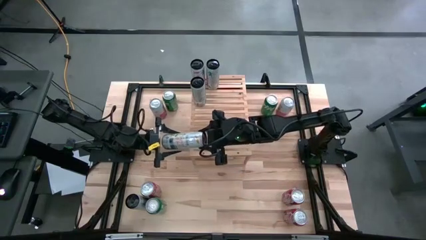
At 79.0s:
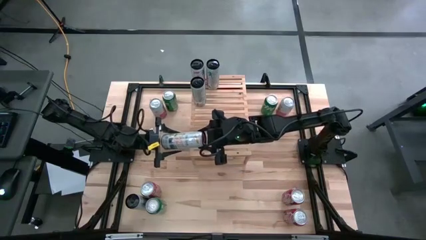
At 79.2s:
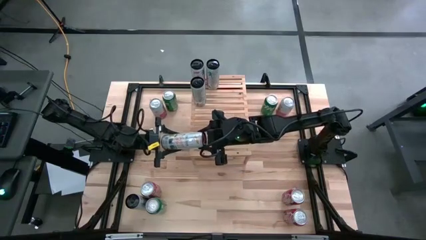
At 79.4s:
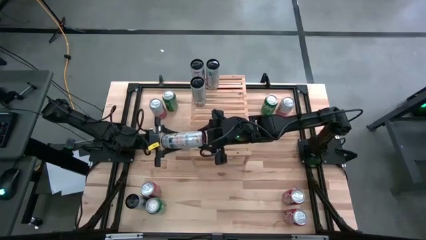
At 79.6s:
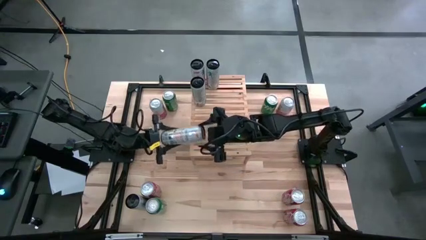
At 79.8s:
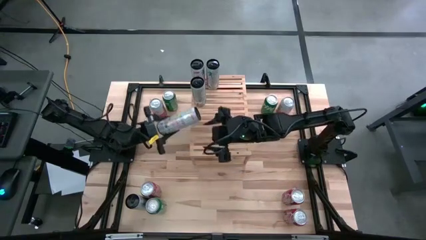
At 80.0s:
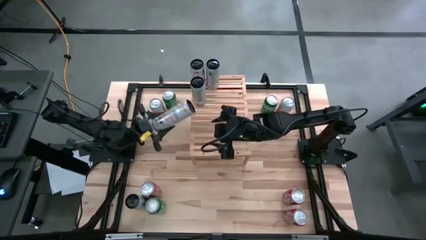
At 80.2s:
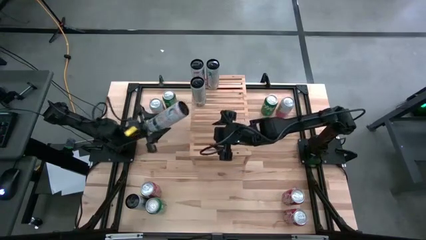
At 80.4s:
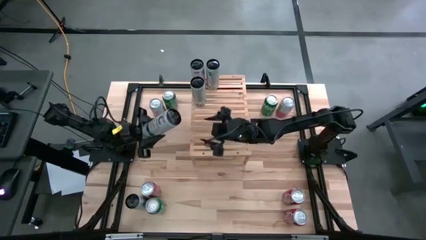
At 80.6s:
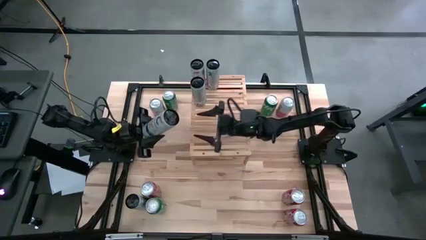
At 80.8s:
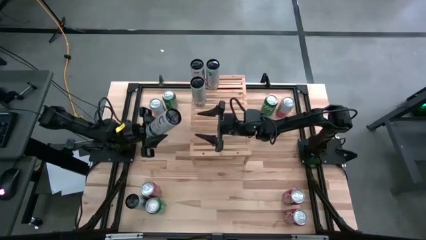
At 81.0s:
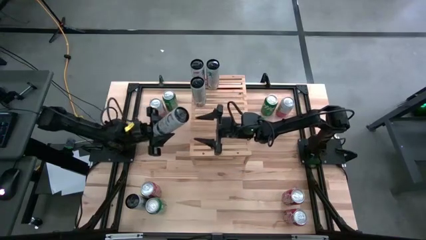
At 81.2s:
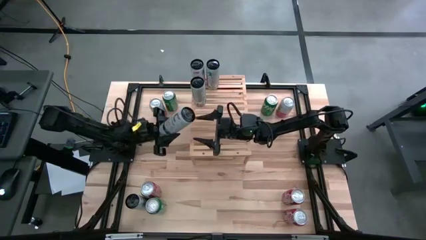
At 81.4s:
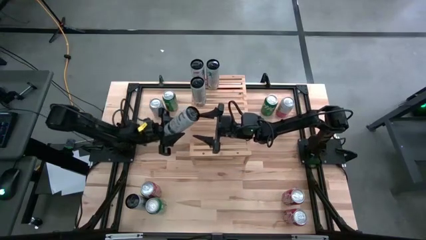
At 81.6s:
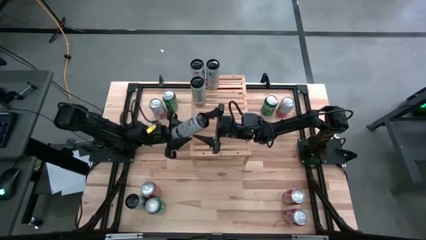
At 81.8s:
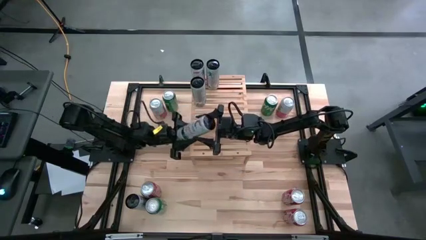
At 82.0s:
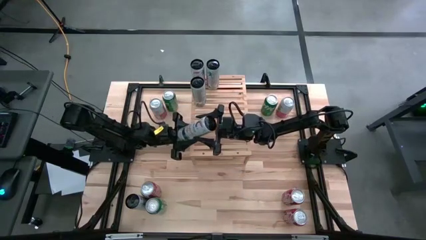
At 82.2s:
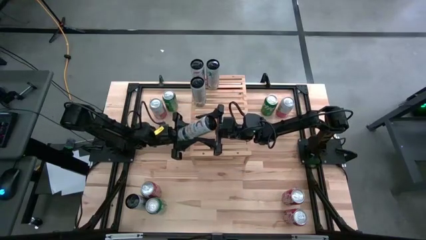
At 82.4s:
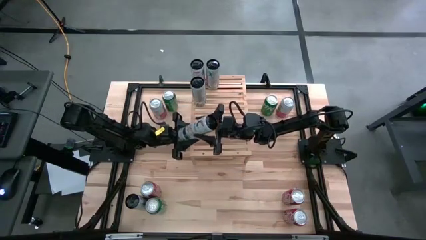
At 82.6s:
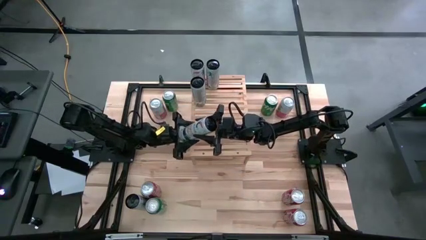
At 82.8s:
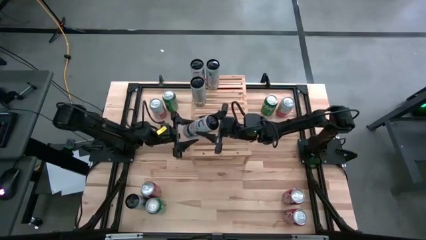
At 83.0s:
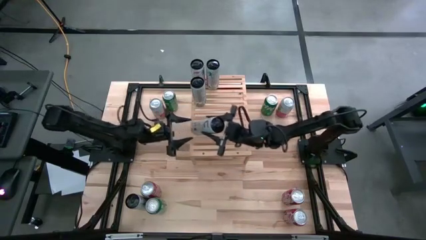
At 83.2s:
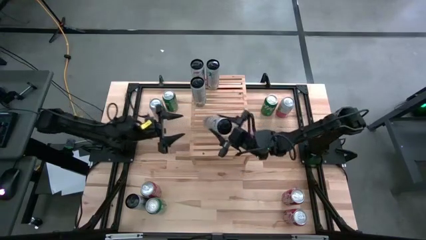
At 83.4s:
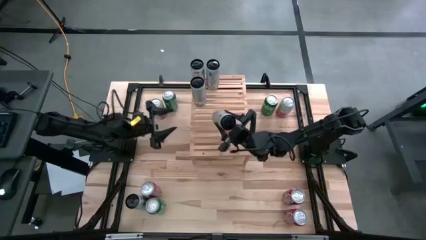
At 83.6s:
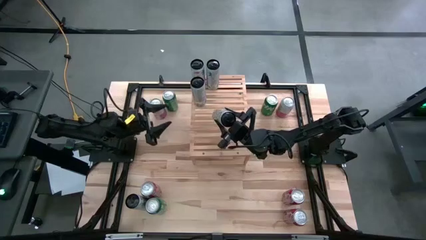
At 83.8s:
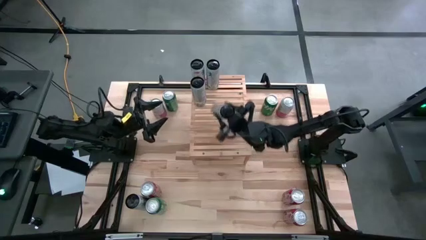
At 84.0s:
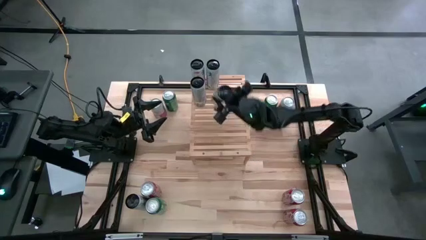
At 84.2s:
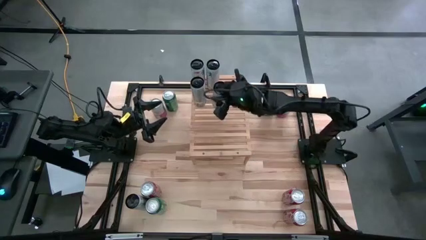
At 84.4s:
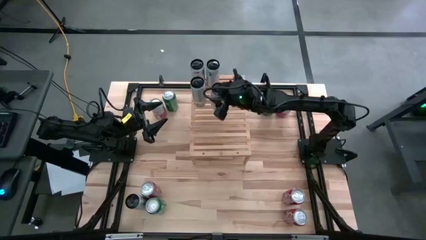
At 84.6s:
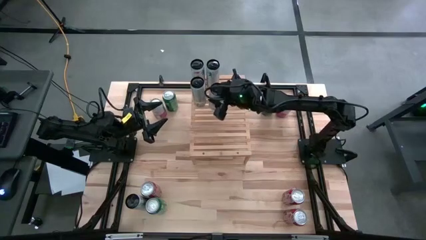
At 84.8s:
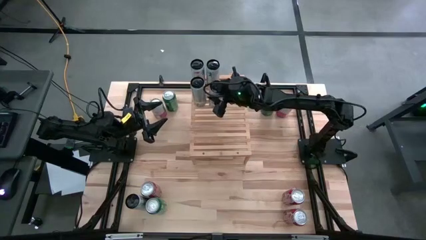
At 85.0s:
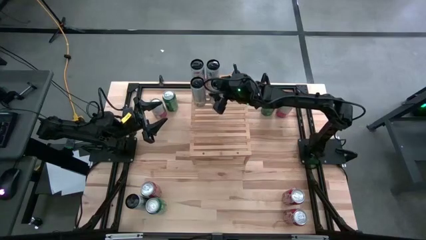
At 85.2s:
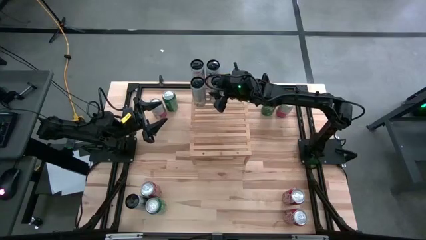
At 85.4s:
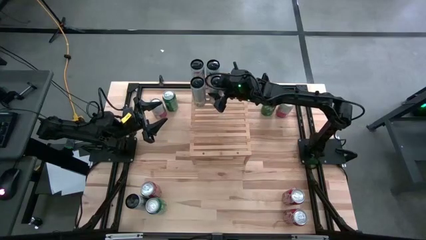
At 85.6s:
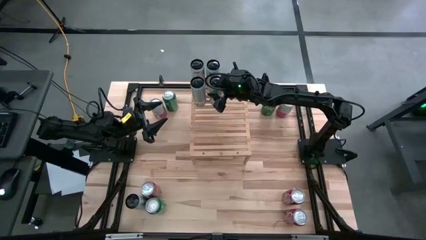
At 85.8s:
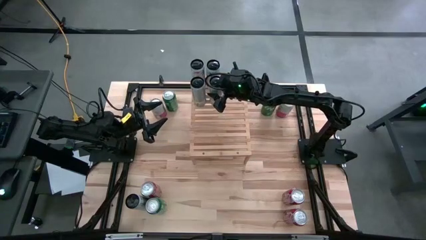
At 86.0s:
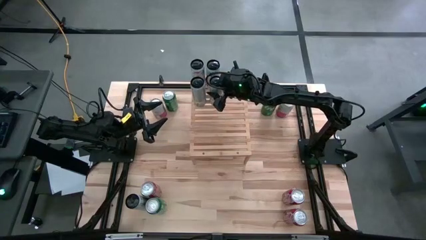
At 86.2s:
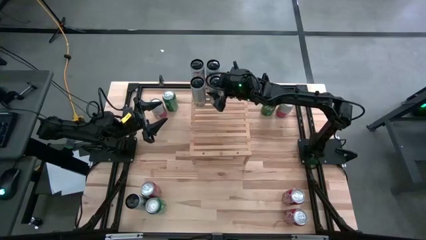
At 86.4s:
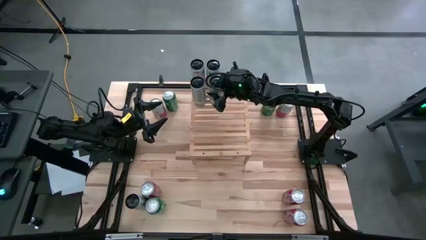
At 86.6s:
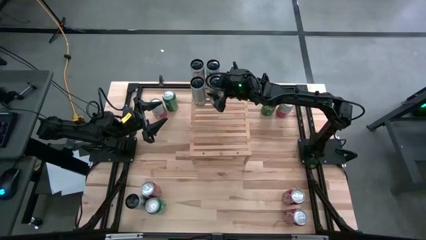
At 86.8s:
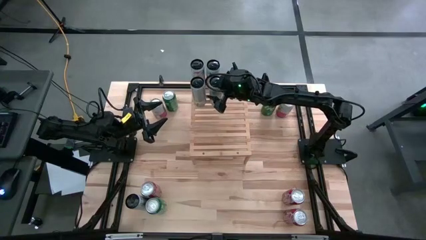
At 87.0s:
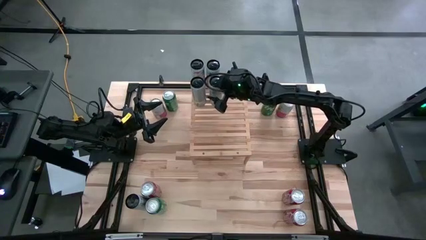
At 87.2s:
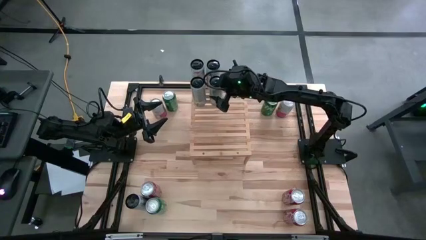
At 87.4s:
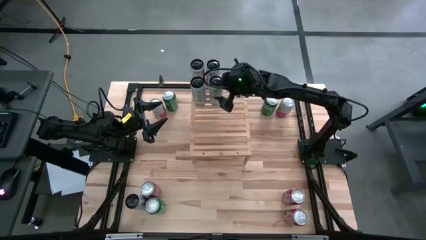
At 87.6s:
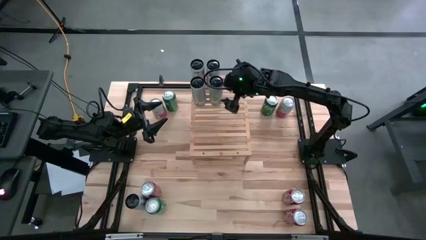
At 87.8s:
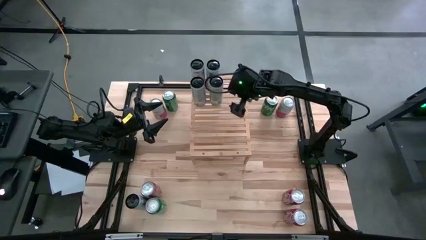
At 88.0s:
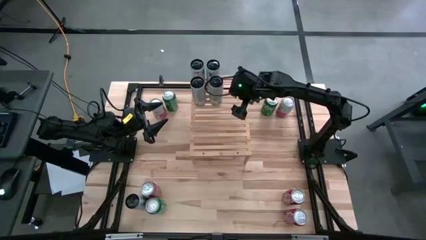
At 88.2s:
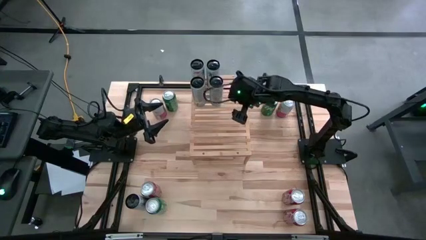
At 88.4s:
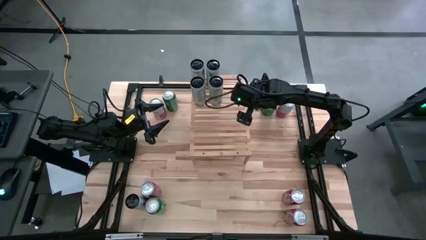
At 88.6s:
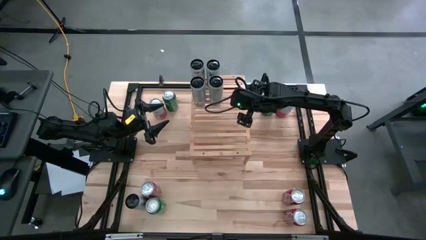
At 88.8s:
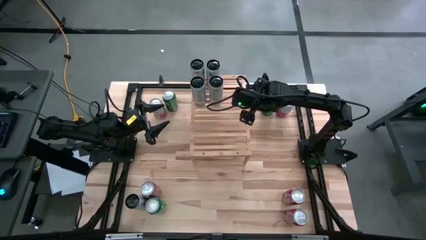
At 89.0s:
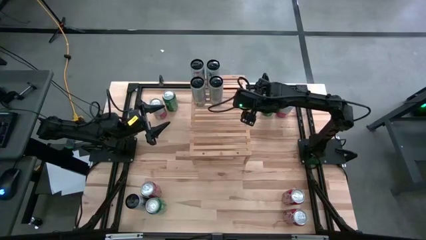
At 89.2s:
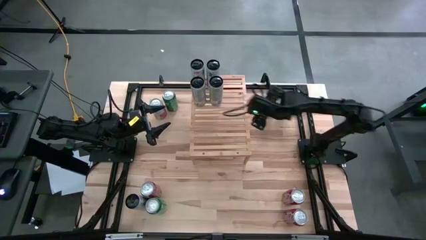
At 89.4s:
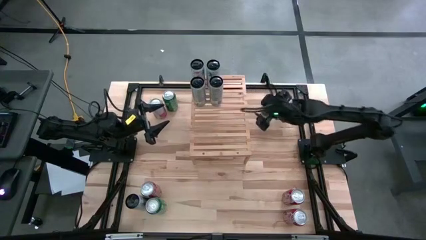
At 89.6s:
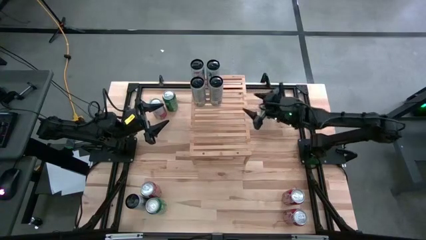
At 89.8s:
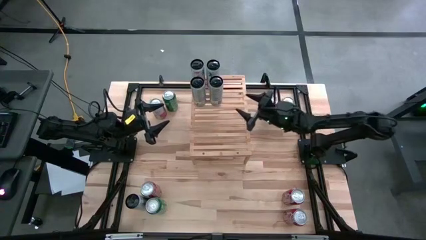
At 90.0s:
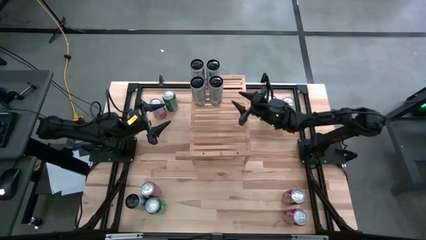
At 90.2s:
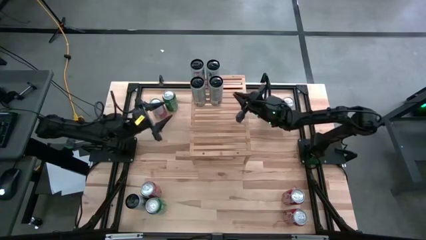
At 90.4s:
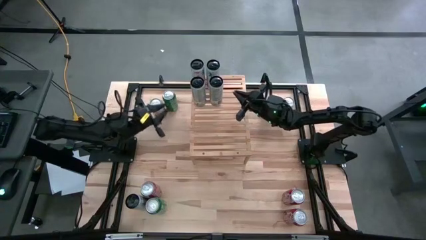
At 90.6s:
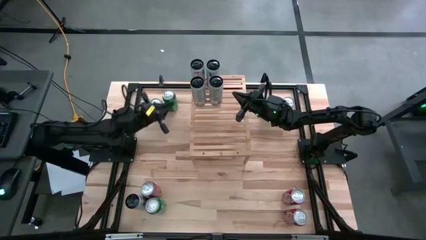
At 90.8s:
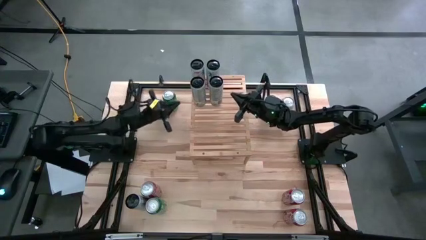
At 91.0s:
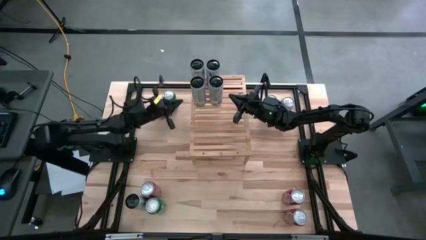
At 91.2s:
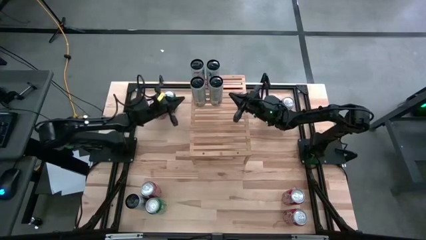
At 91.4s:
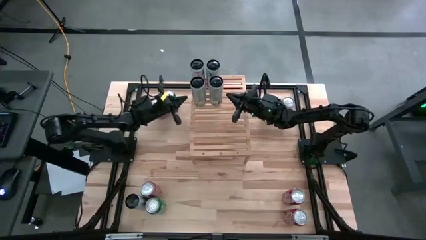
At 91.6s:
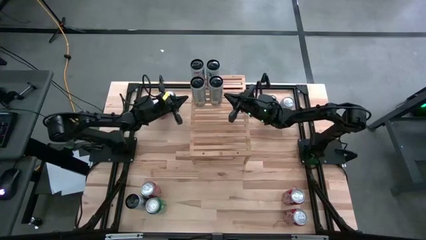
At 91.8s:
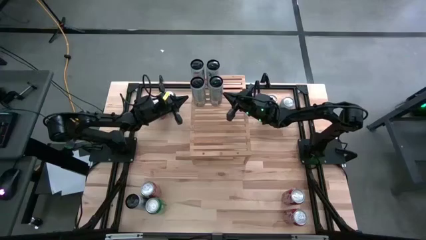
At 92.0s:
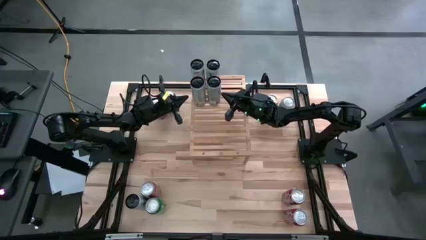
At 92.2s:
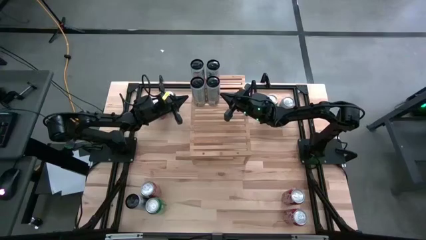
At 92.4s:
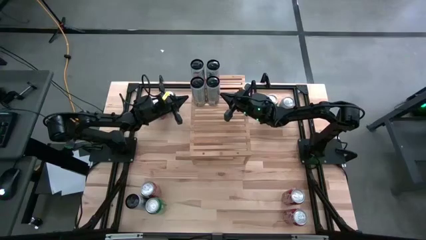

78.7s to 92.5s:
Task: Place canned beverage on shelf
Put the white yellow soda can aligned with the other white yellow soda can on the shelf

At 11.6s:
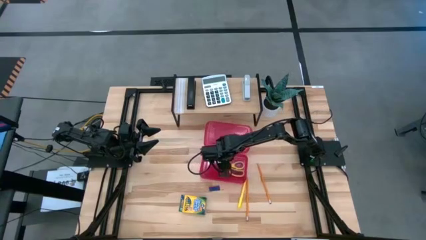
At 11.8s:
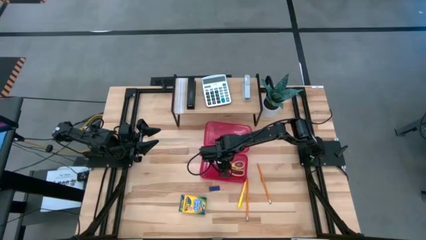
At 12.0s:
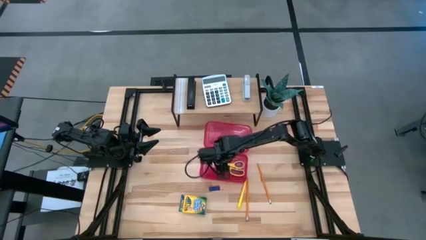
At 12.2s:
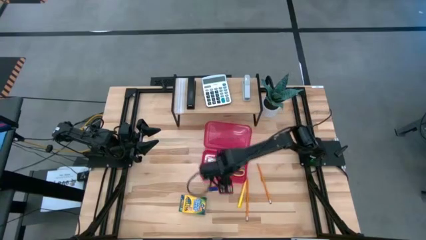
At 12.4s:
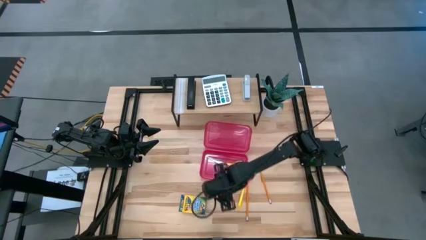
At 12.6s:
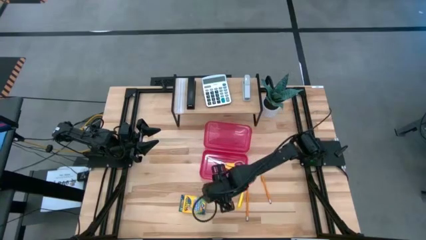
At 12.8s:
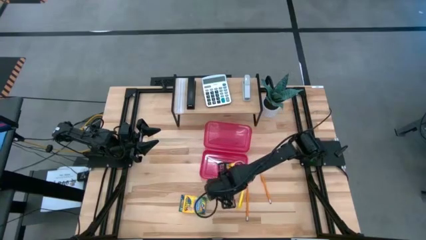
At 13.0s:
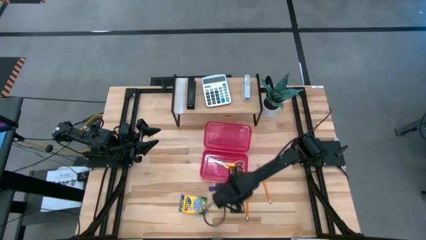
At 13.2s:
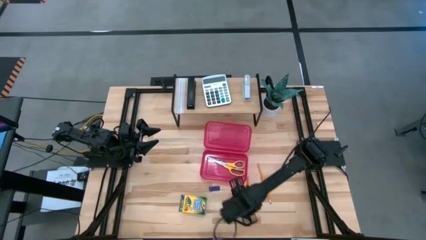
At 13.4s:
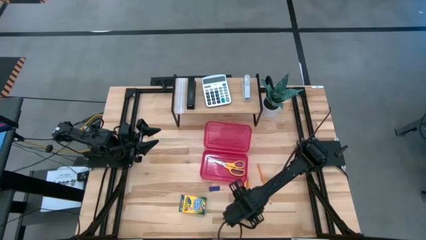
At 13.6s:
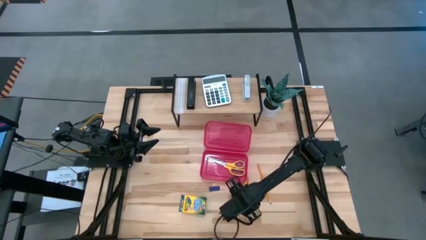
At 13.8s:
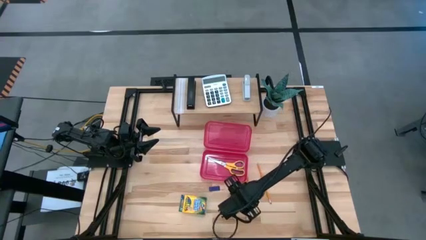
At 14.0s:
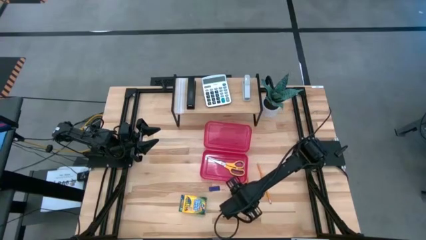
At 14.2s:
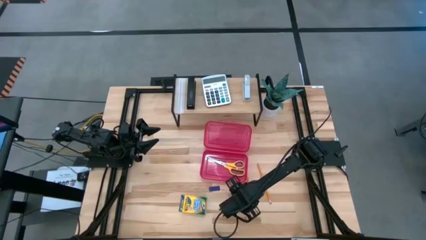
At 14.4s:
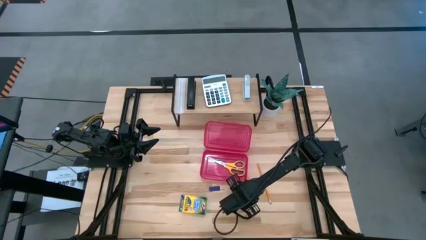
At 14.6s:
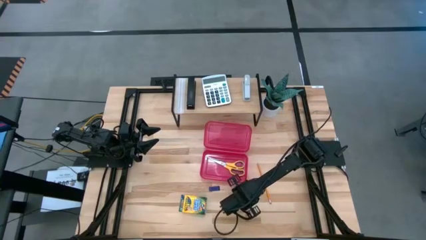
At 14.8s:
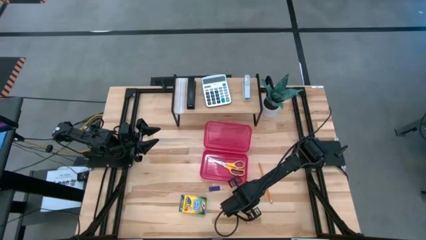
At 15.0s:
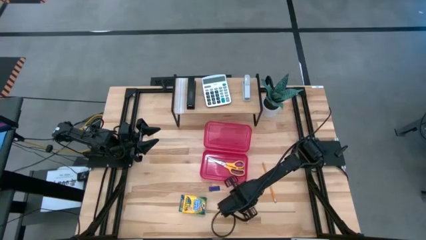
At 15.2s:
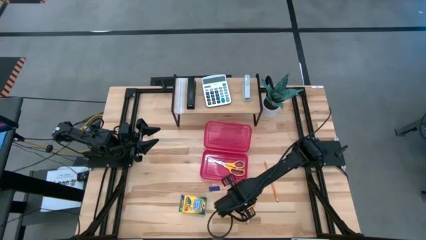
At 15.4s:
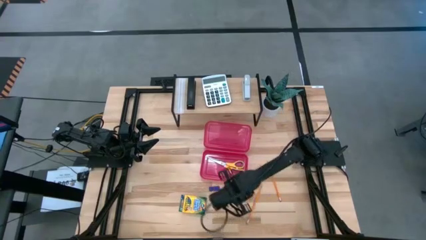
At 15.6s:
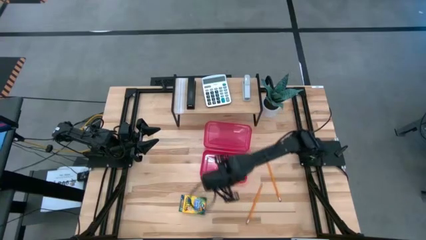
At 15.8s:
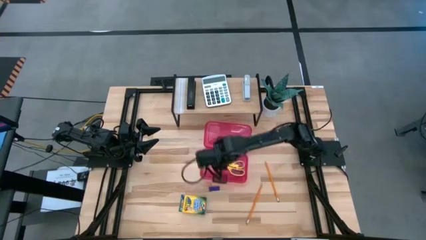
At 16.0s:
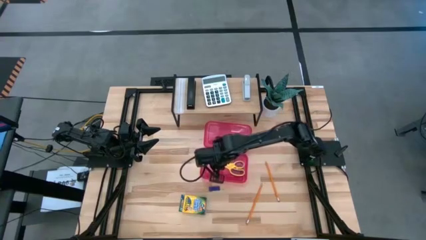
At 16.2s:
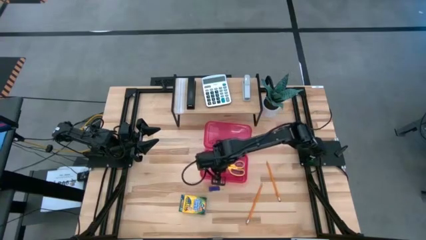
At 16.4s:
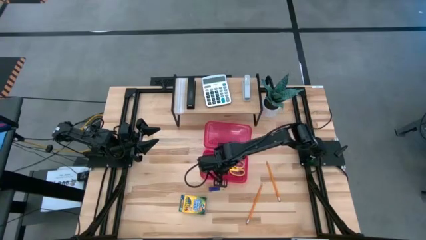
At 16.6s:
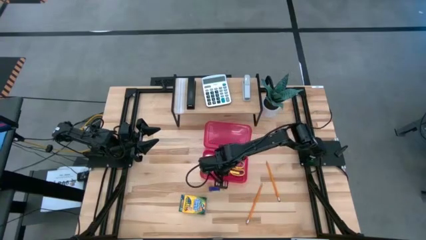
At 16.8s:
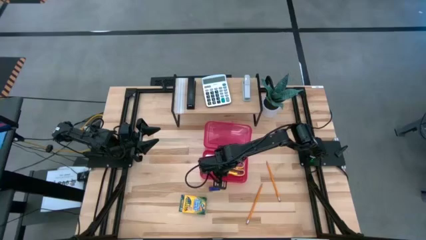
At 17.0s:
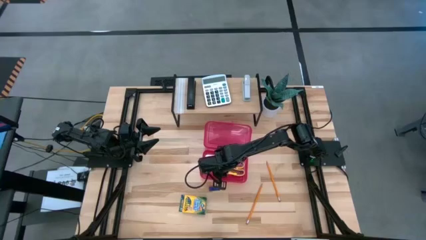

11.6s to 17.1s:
Task: Pack school essentials
Put the yellow pen into the red supply box
